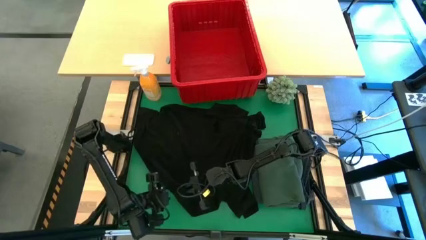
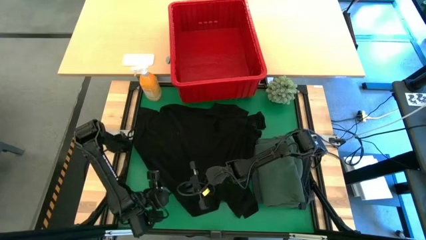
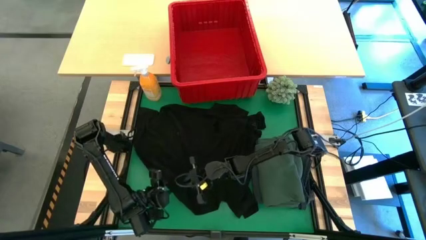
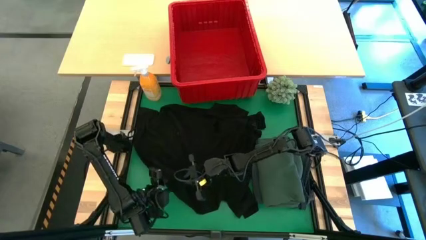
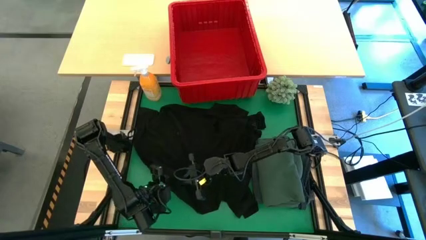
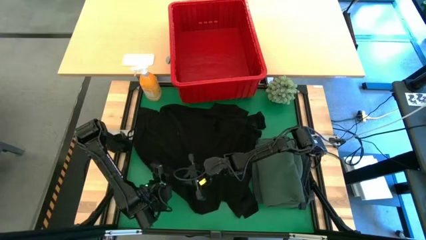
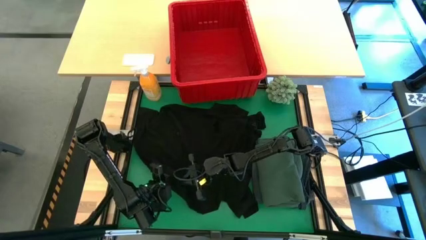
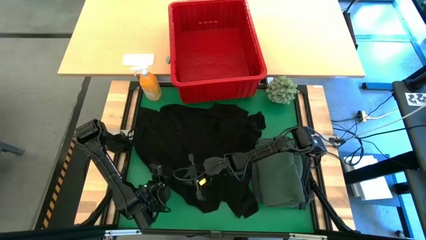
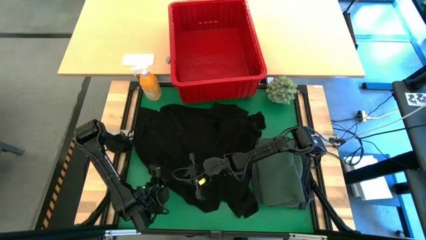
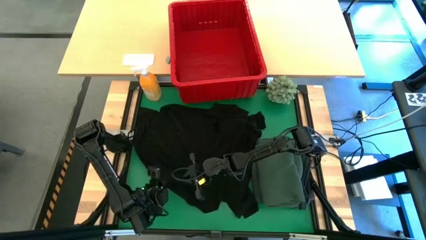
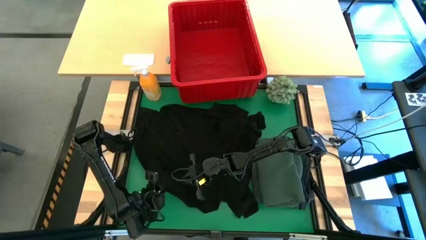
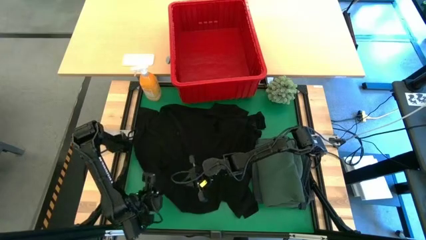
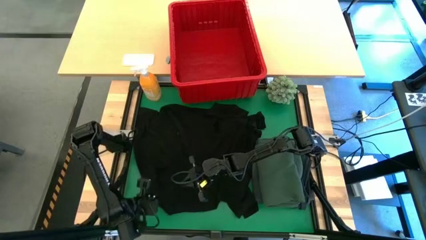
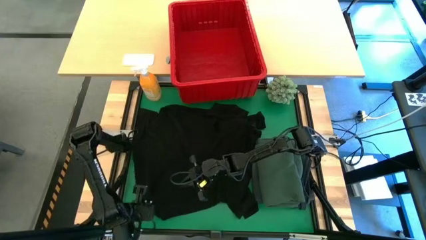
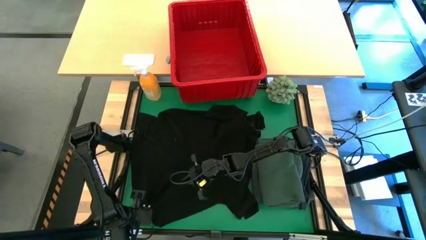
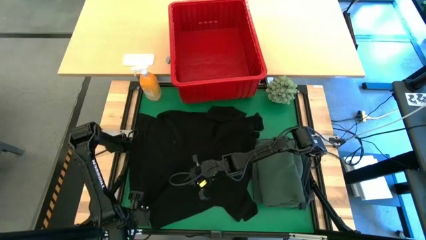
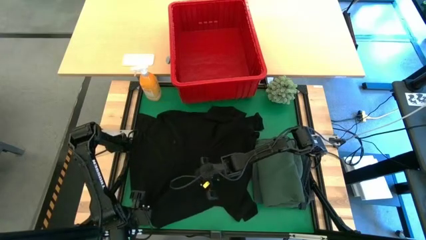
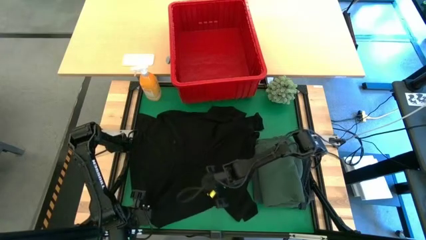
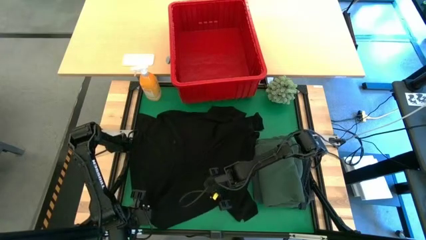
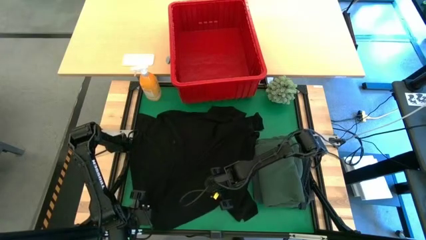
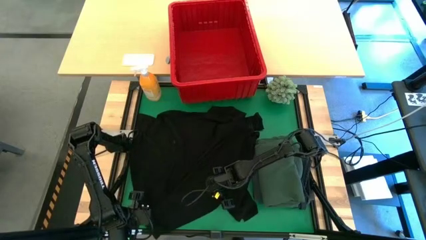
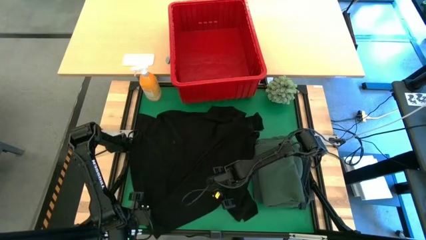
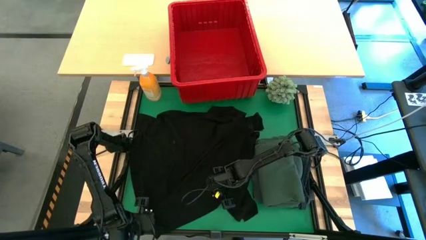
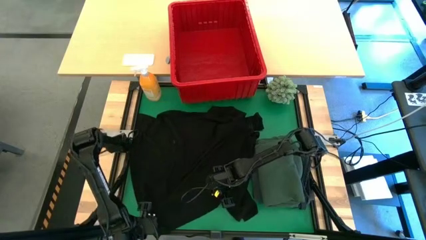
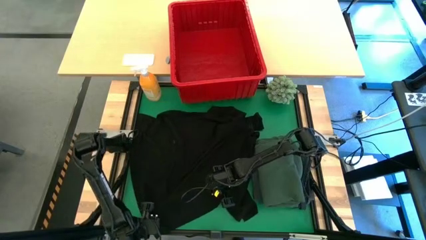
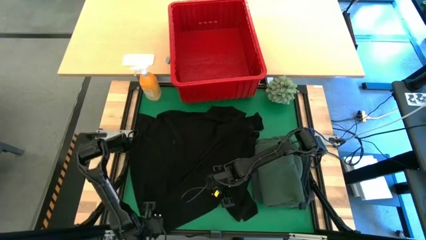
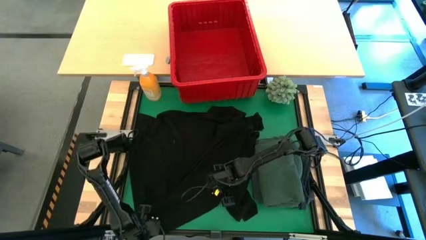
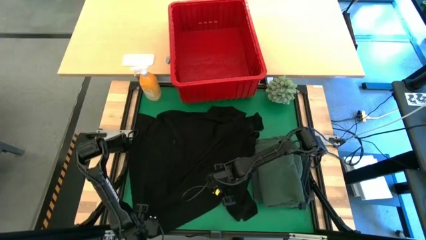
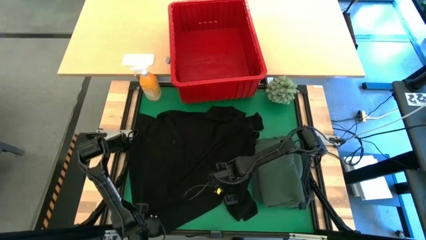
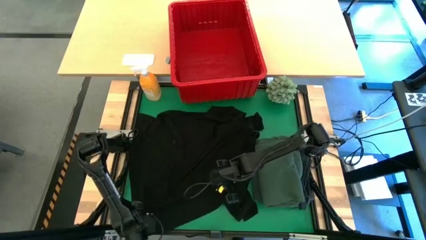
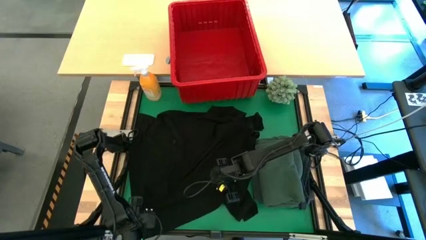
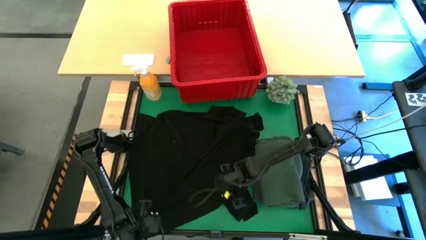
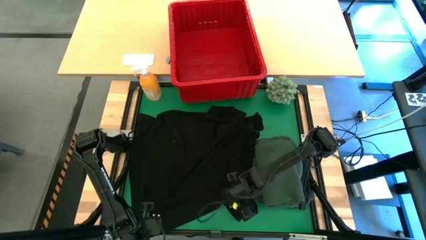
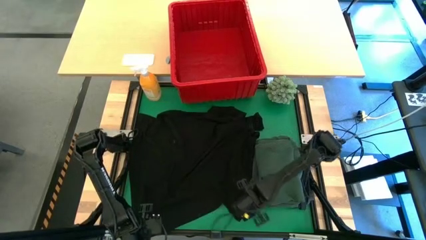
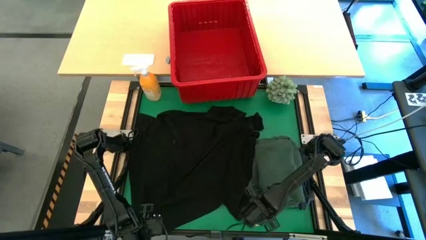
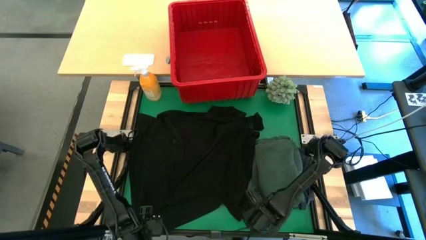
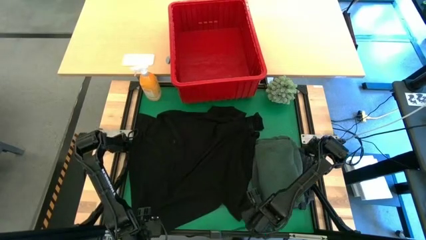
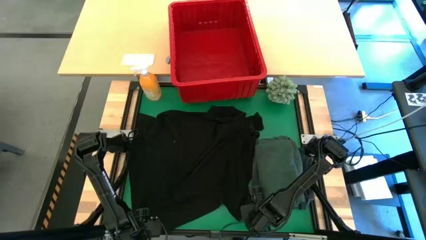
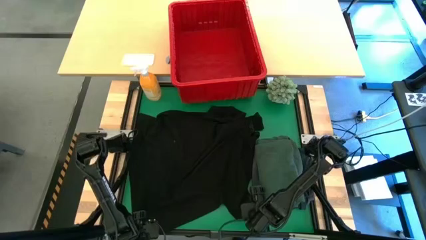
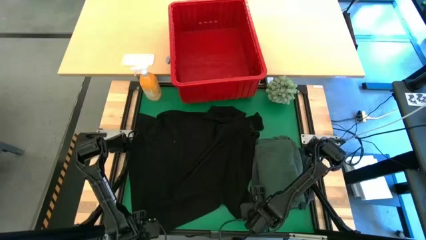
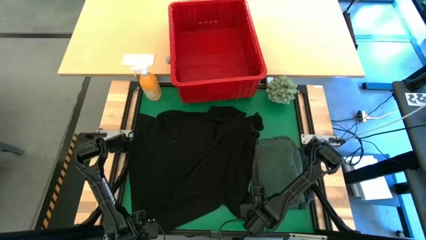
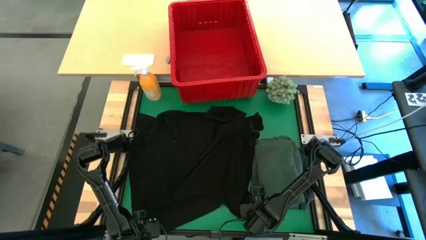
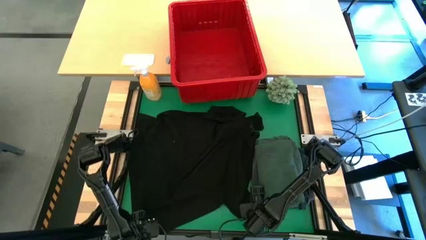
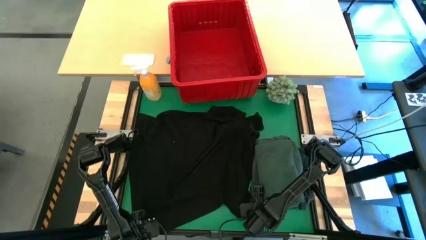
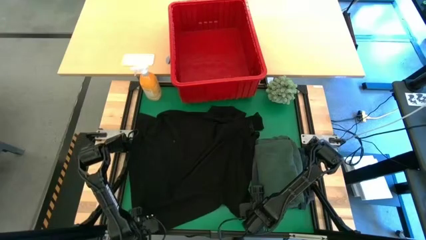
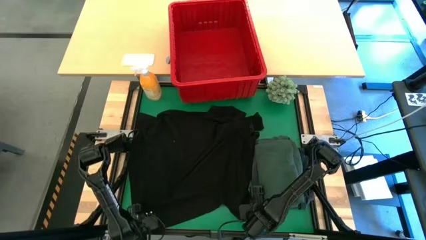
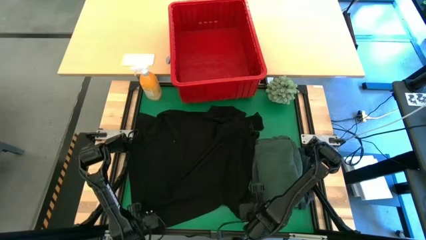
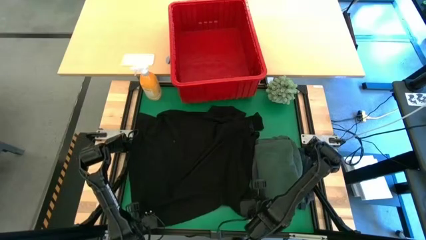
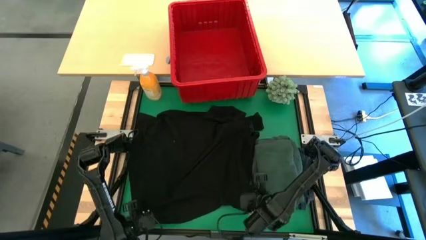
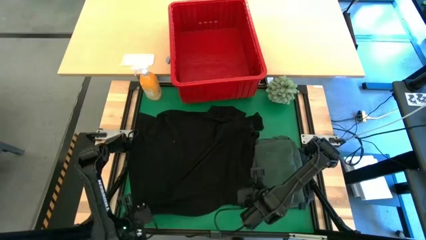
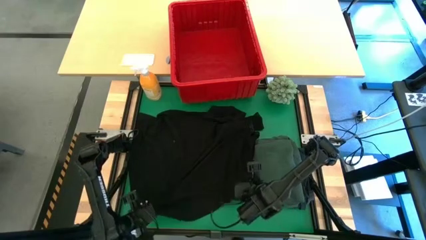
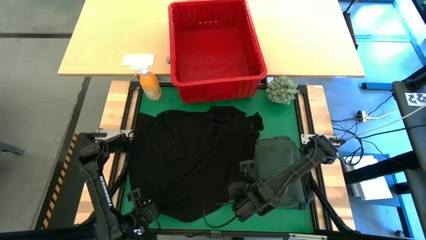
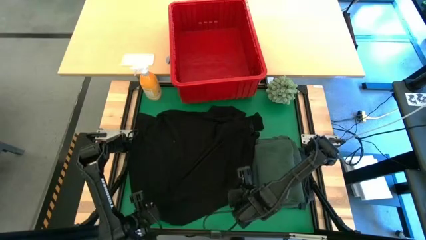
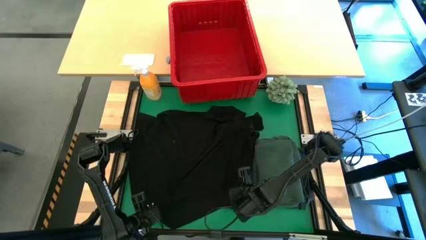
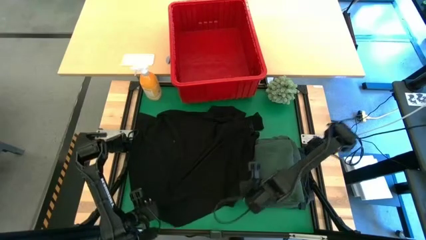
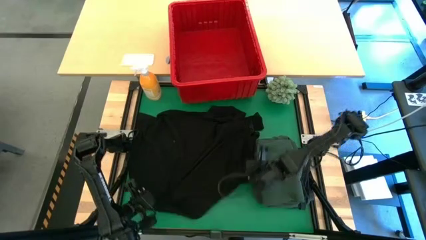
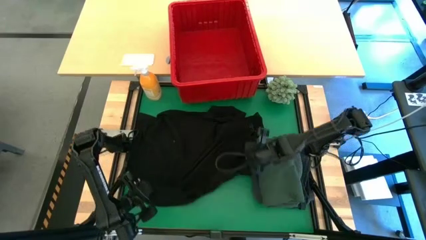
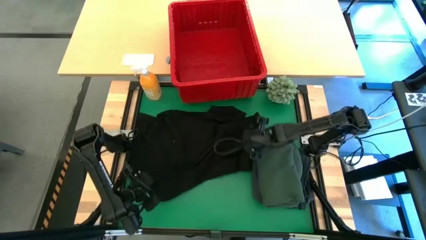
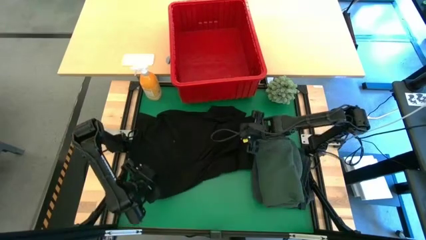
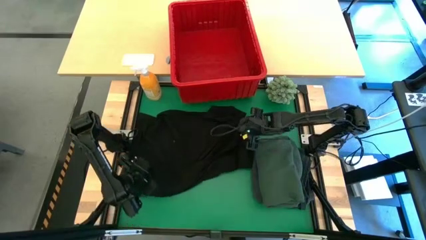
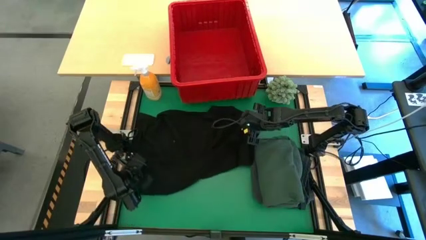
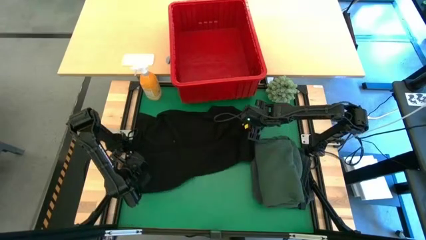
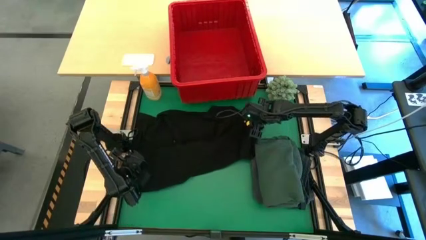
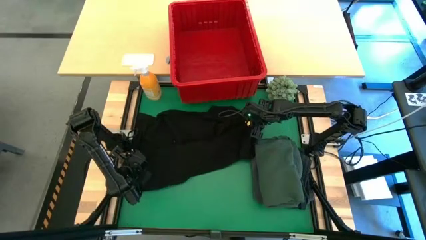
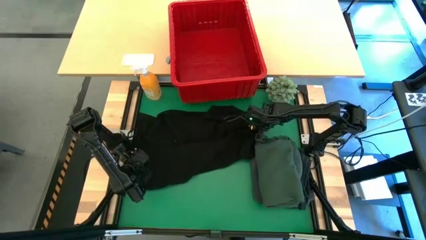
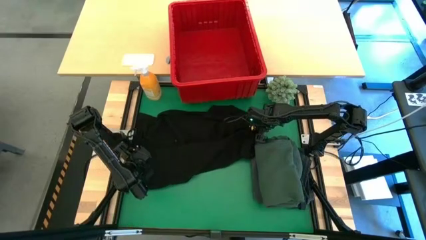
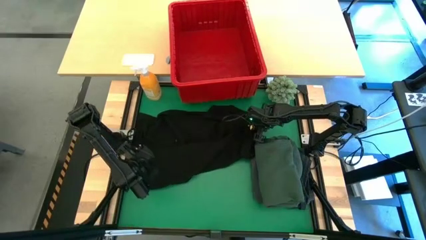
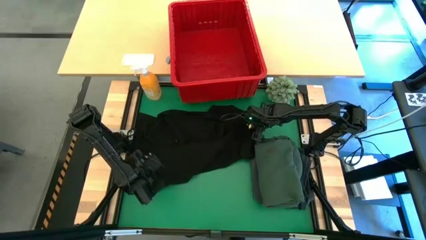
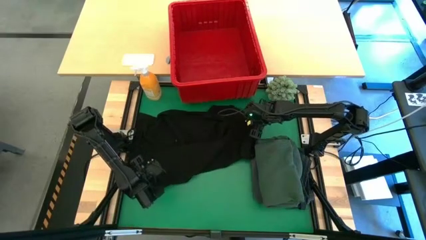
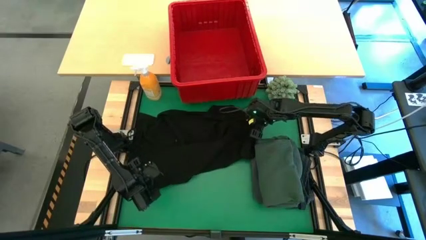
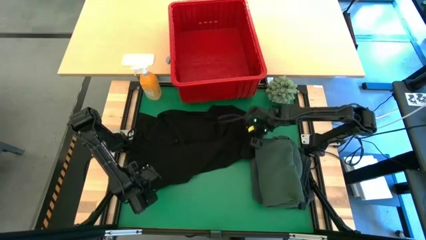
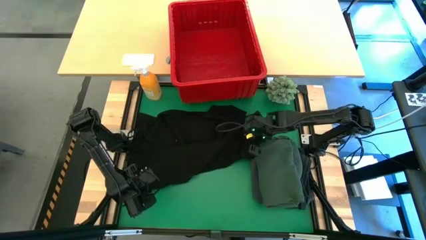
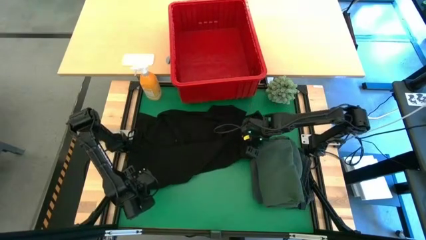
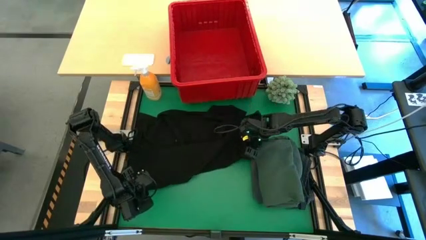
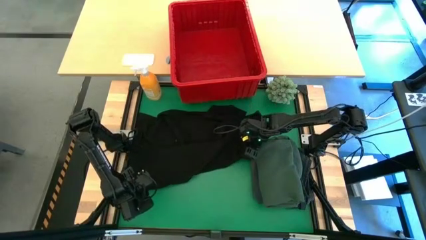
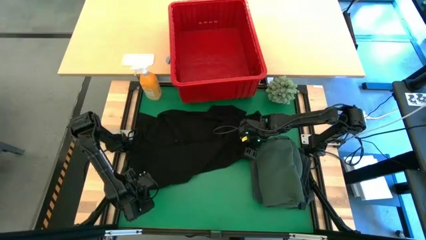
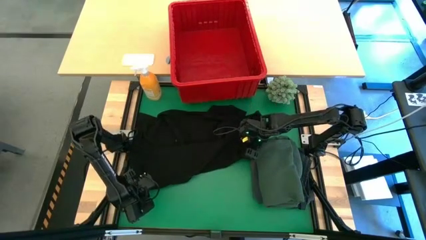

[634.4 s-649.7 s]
Task: Fold Laundry from Bin
Fold the black shirt

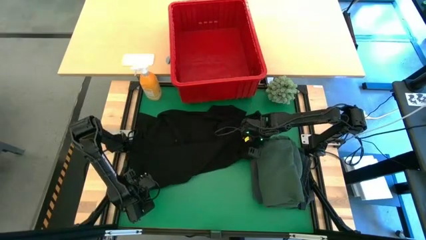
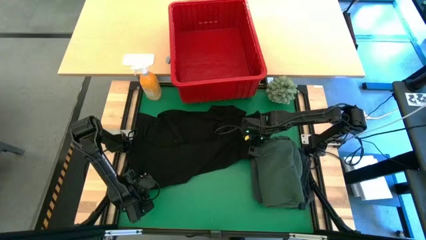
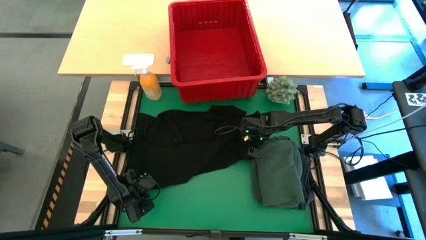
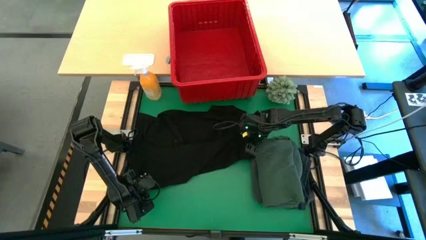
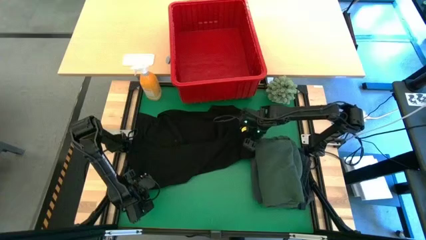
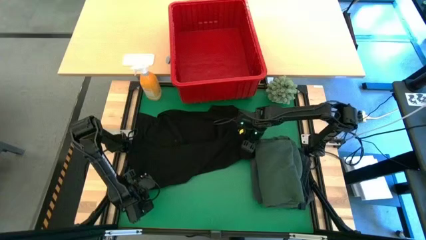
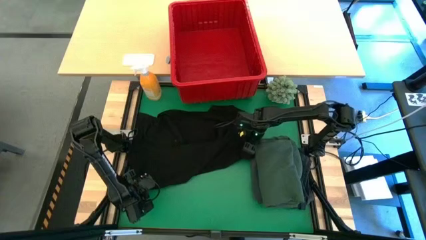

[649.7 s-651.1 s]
Fold the black shirt
